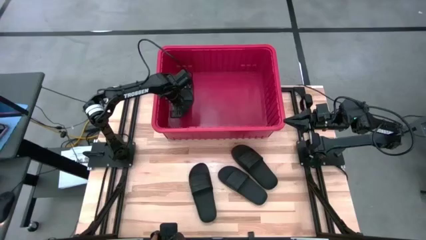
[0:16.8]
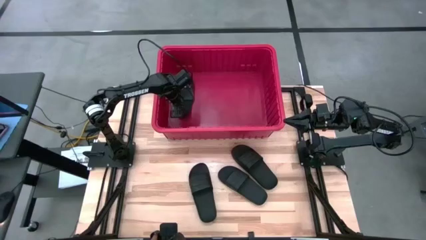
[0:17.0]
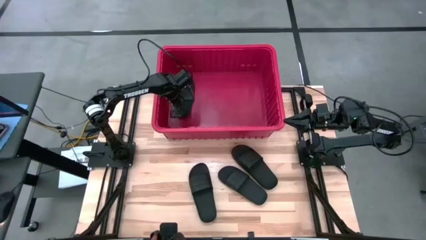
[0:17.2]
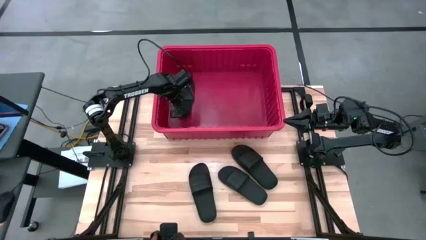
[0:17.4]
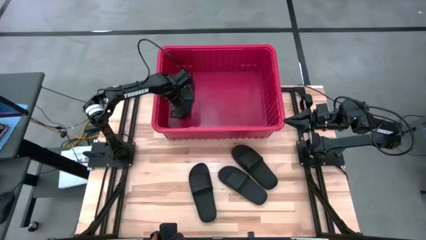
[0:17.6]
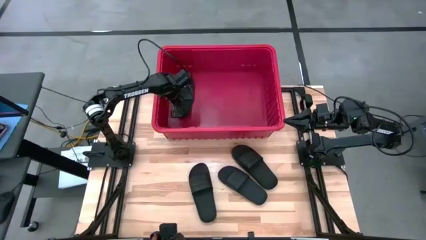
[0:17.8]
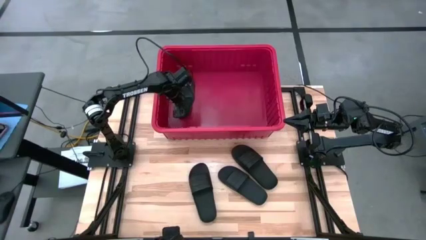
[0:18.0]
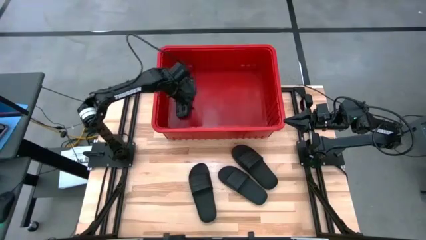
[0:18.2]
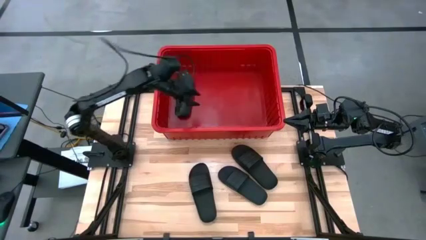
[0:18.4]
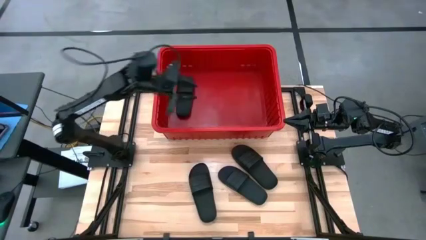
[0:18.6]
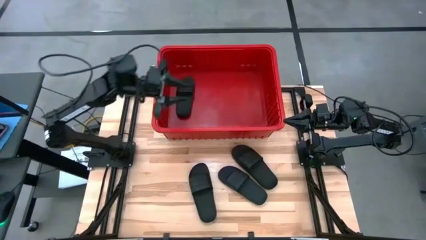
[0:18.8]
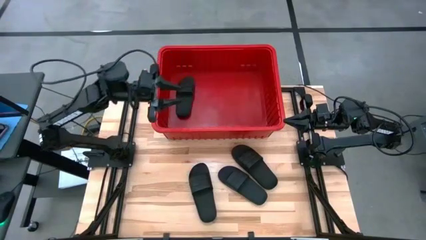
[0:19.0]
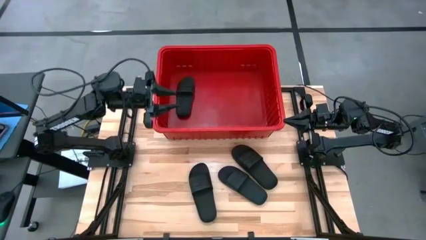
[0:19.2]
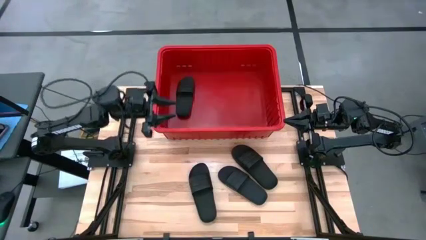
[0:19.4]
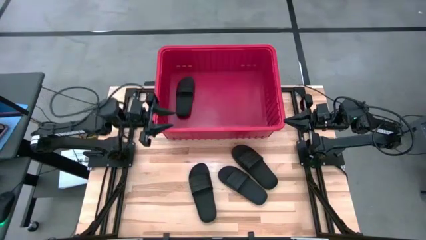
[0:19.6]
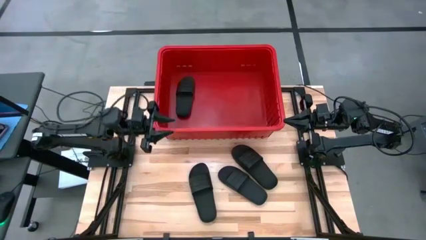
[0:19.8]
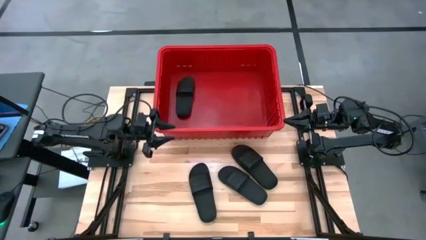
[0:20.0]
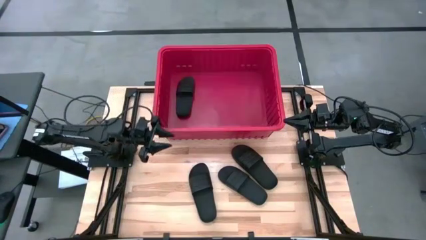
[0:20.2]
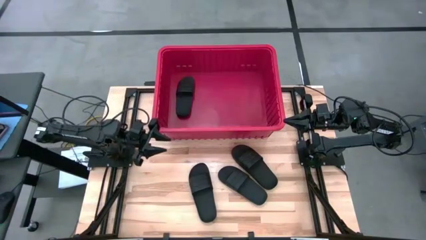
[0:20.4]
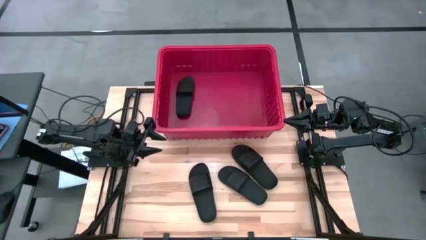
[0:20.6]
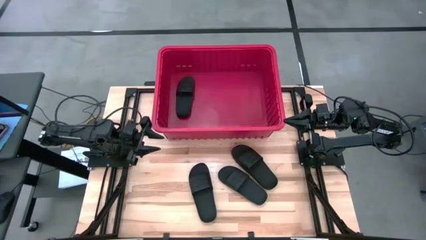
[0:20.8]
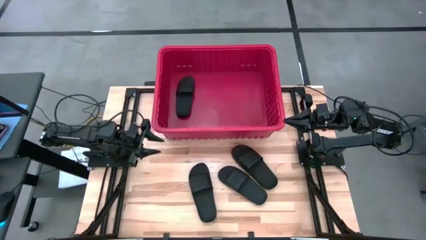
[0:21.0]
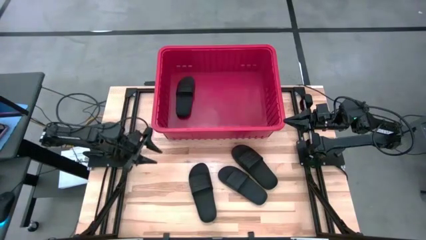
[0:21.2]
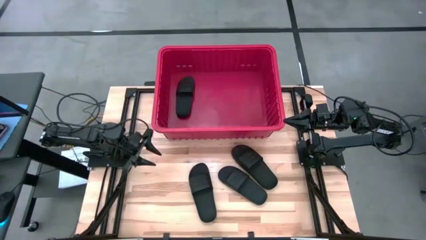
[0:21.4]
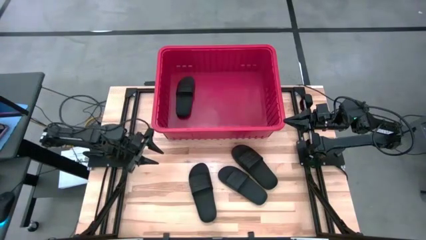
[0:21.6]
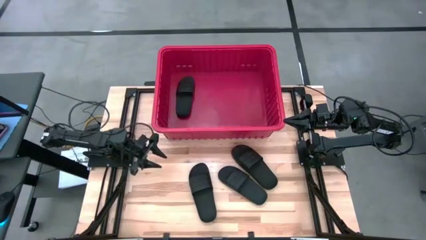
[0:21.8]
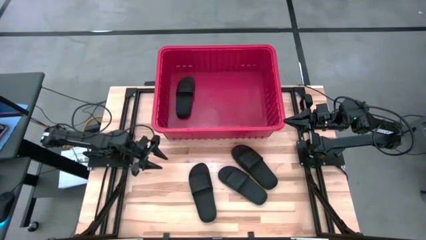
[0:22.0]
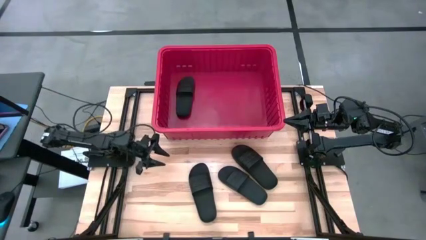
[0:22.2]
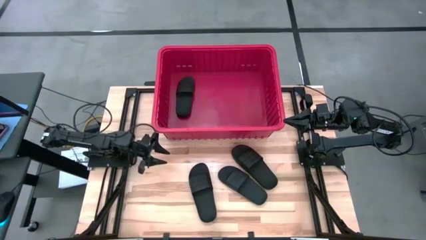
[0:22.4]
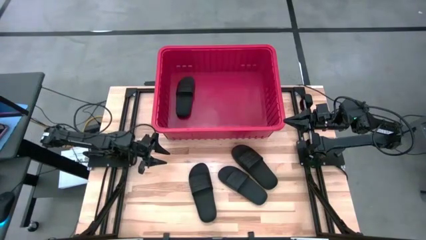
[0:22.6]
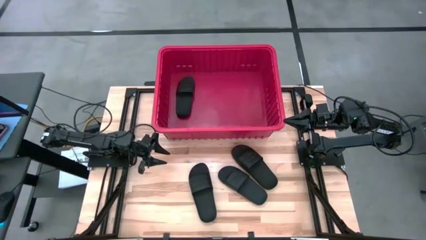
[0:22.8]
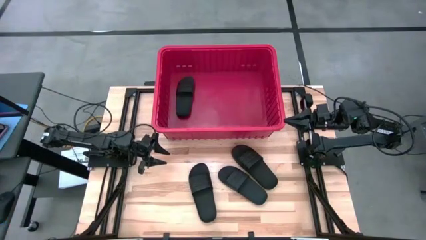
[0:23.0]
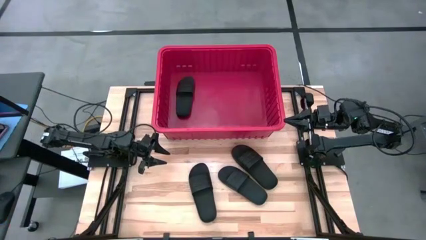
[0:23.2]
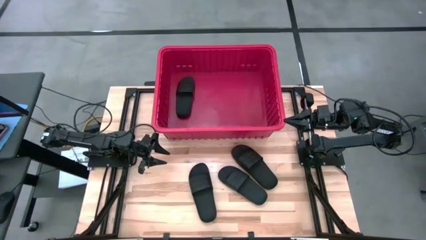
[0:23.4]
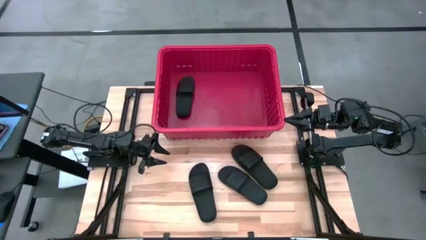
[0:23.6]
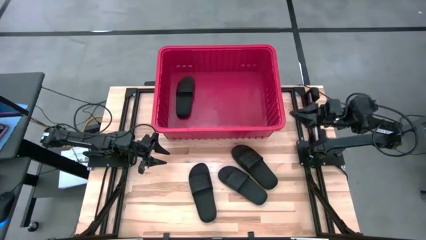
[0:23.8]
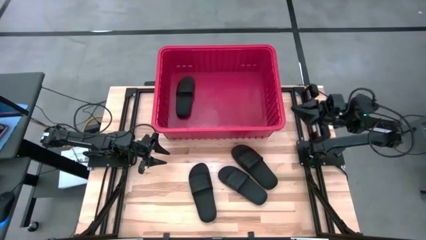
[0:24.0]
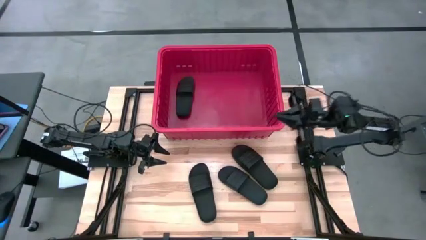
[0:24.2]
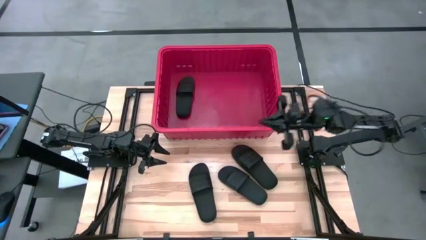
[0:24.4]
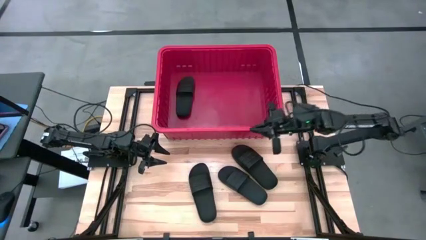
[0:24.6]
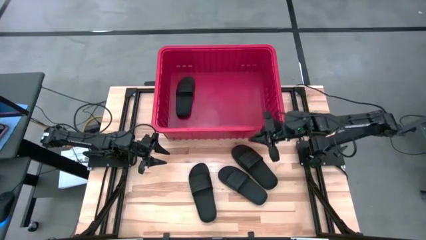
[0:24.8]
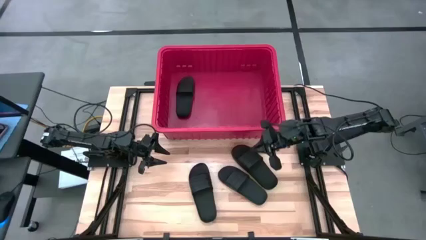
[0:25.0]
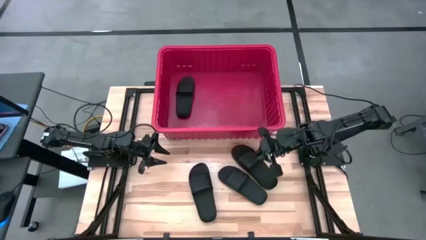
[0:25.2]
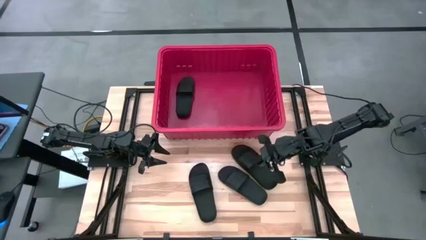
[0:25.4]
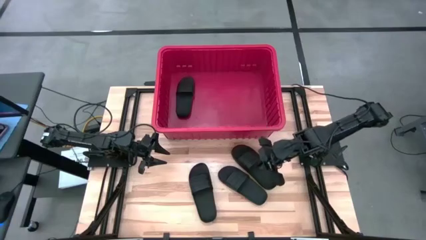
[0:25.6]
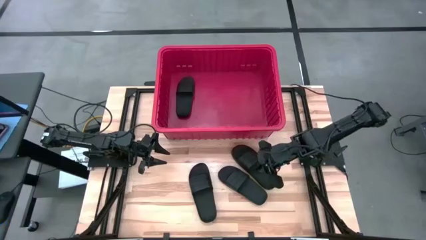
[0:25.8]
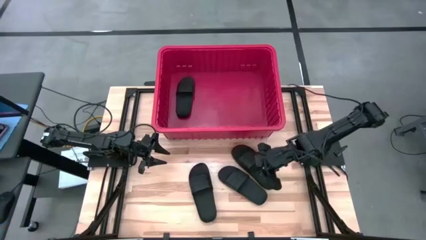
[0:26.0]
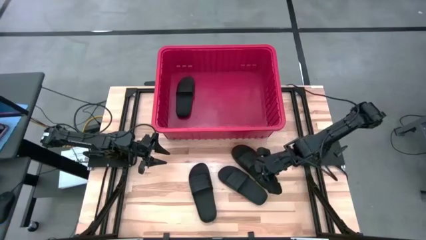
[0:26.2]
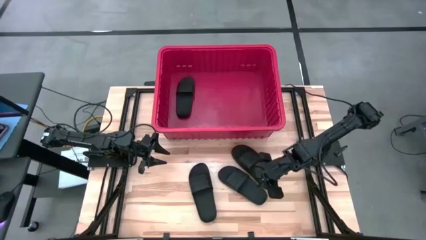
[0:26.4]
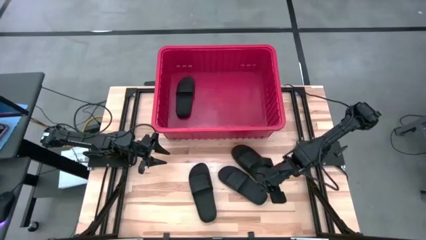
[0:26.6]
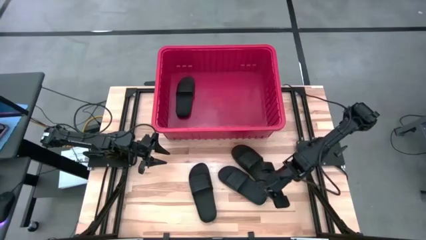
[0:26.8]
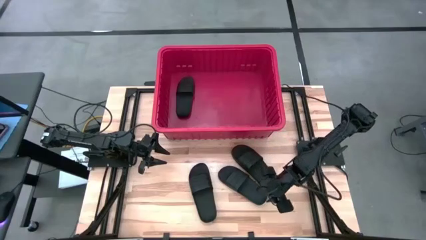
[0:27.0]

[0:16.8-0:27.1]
Task: Pick and place slides into bin
Put the black slide into the red bin

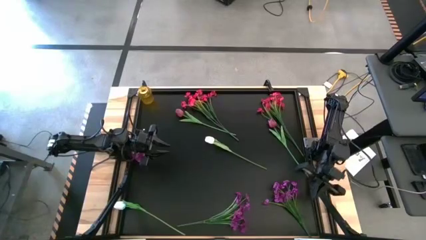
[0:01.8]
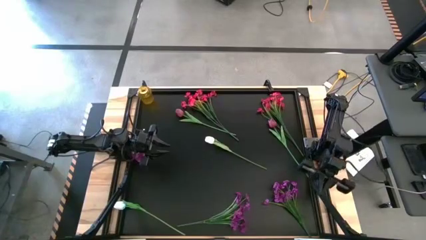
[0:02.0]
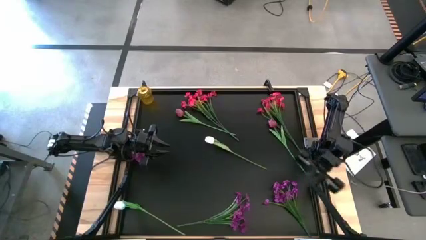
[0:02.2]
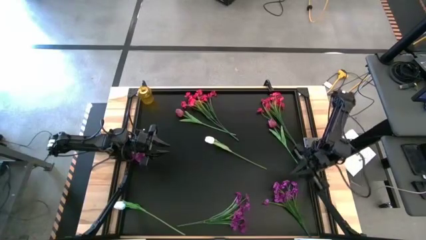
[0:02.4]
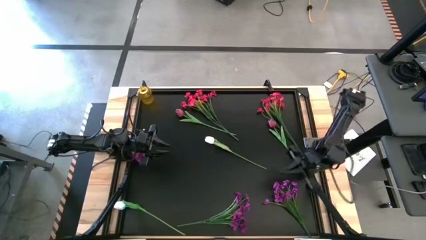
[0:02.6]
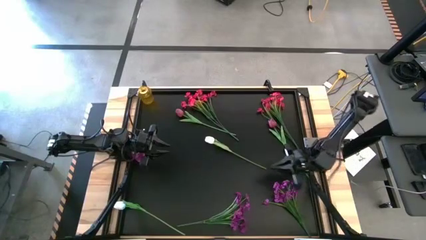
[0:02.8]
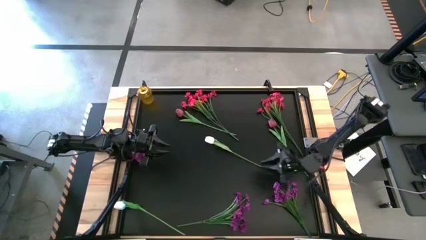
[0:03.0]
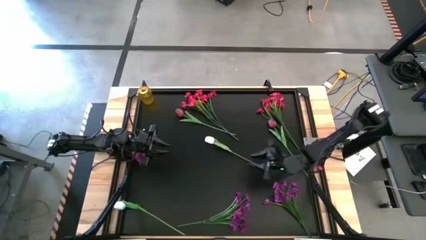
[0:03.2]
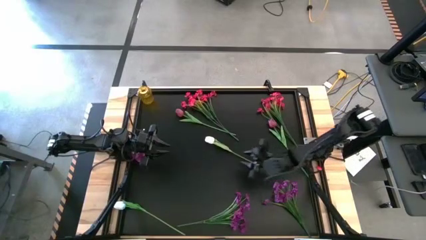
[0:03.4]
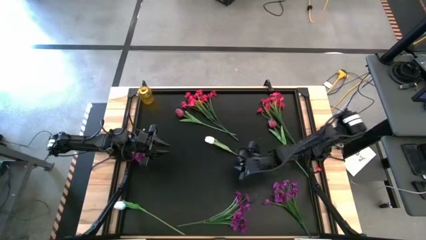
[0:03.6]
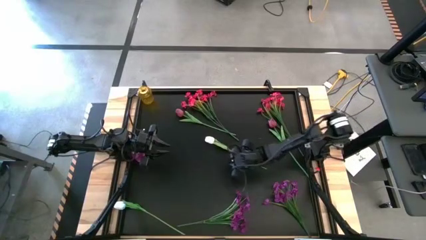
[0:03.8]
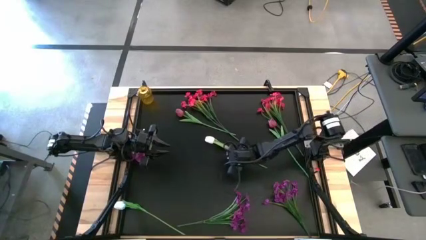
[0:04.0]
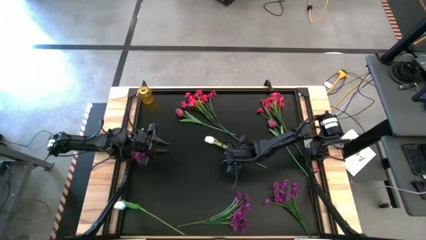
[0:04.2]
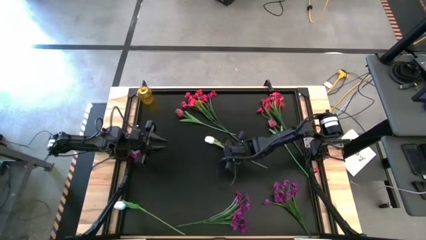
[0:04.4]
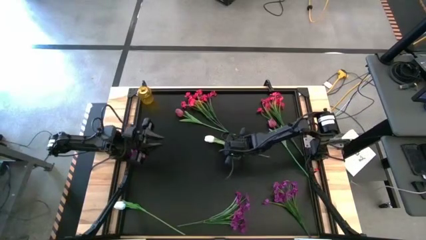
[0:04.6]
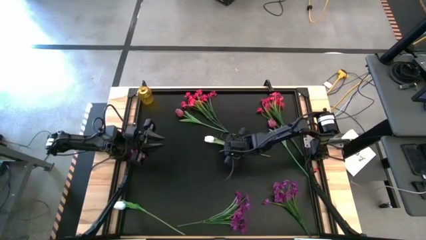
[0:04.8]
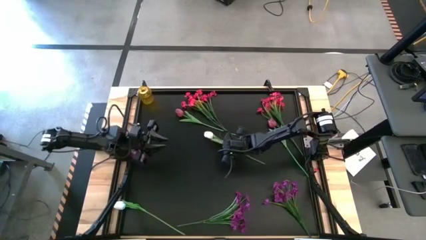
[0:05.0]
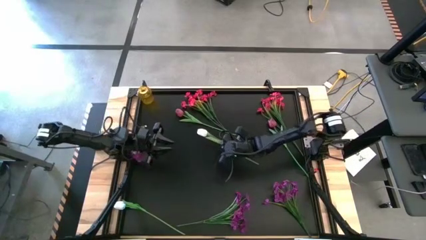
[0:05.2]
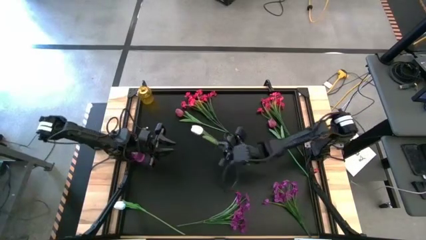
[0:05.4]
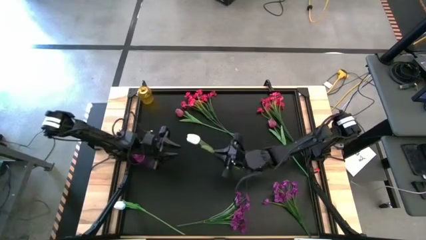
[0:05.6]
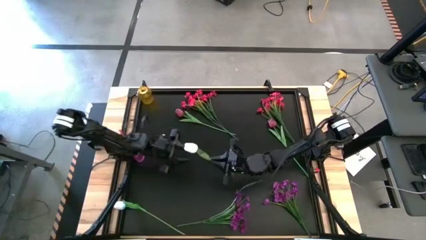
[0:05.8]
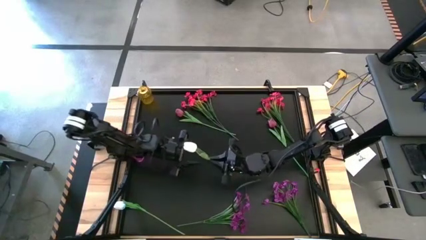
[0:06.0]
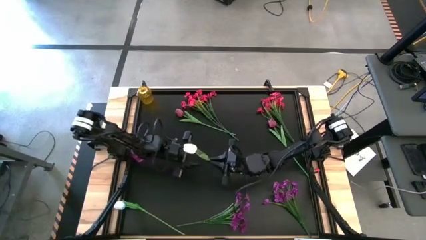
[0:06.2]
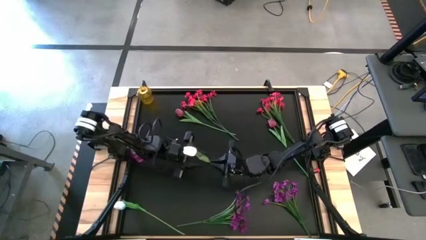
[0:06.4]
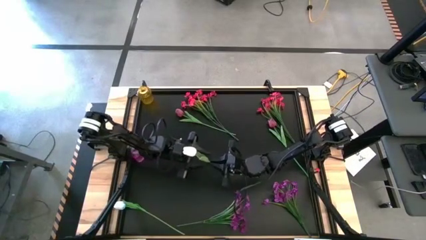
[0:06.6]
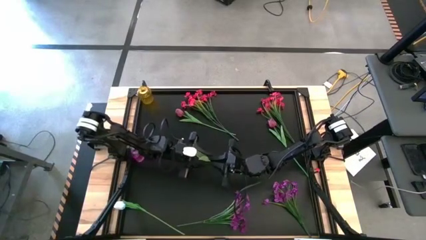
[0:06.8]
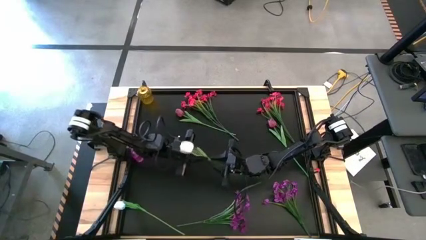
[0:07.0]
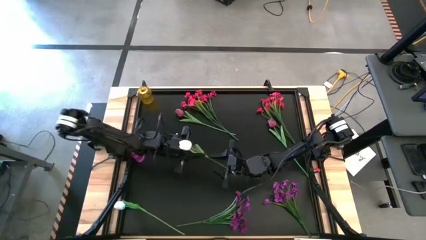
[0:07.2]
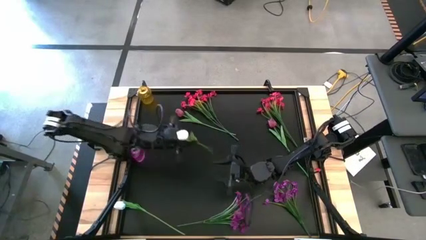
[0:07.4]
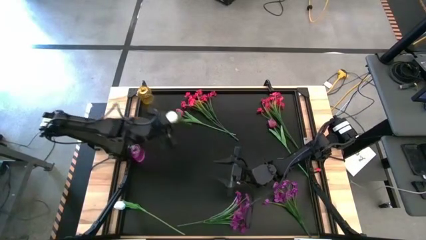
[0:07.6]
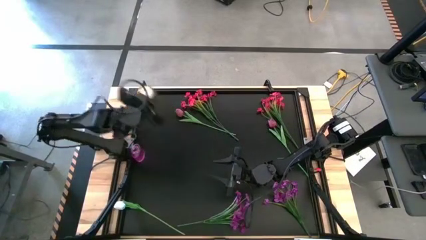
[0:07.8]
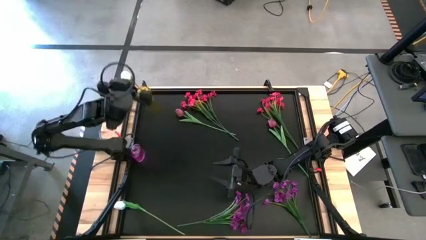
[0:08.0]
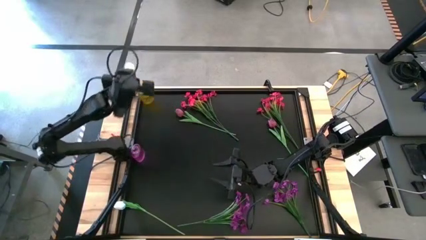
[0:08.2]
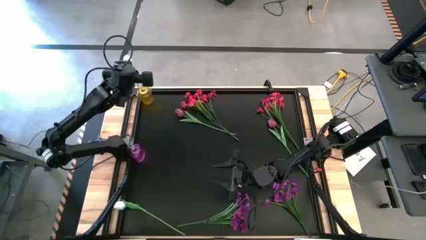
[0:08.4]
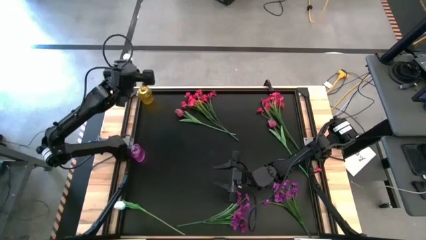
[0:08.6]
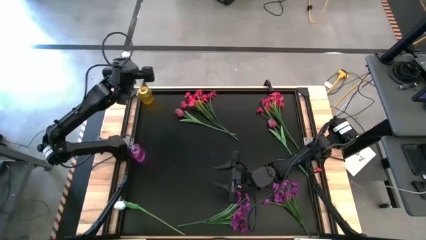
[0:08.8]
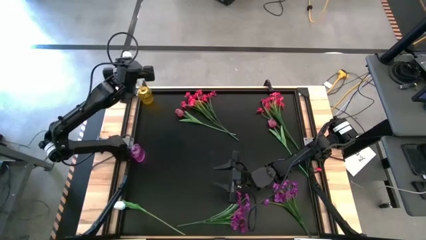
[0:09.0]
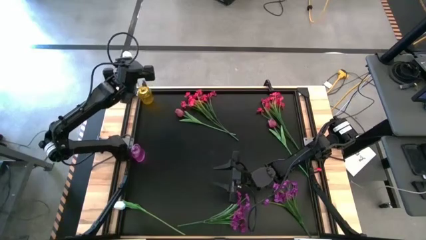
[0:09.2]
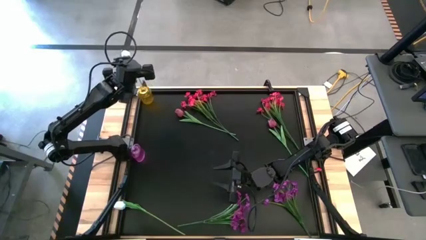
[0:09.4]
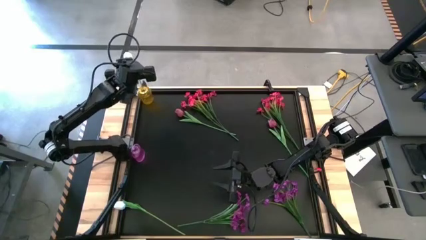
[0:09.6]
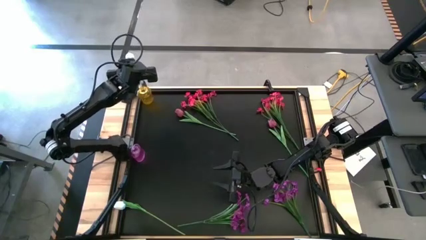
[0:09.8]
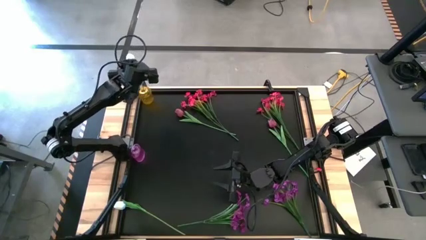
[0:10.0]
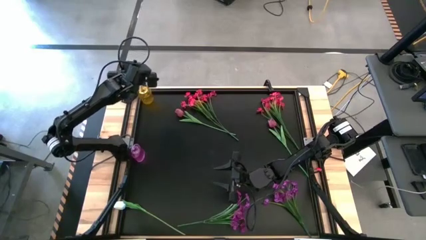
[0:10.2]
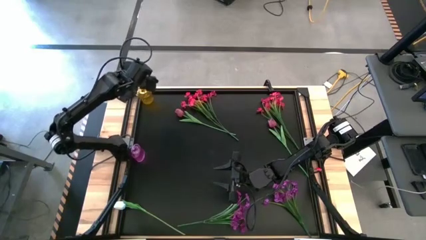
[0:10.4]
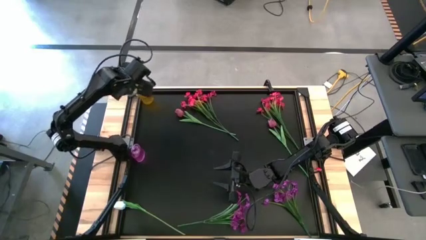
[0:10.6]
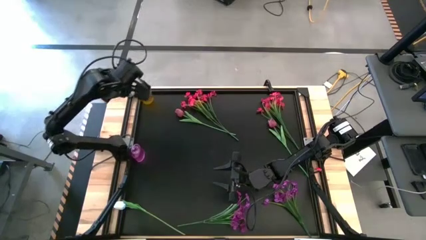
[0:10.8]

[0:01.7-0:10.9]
Task: Sort flowers into vase by color
Put the top white flower into the yellow vase
